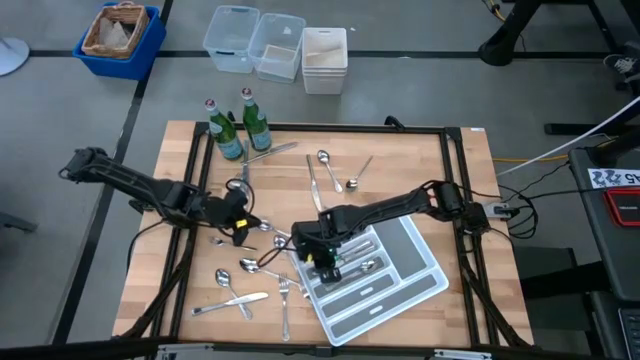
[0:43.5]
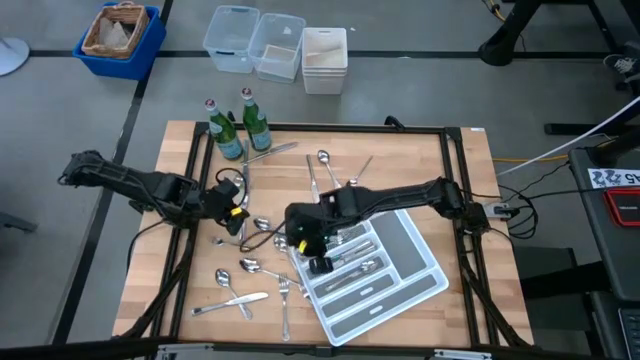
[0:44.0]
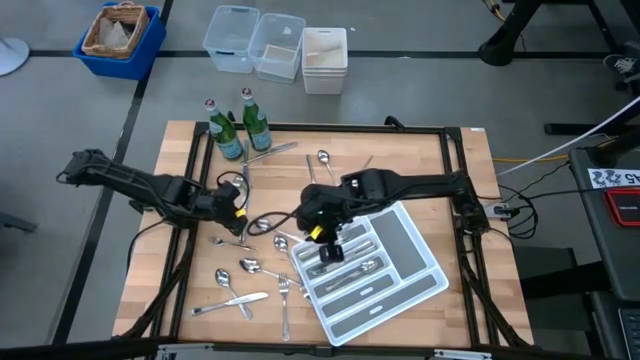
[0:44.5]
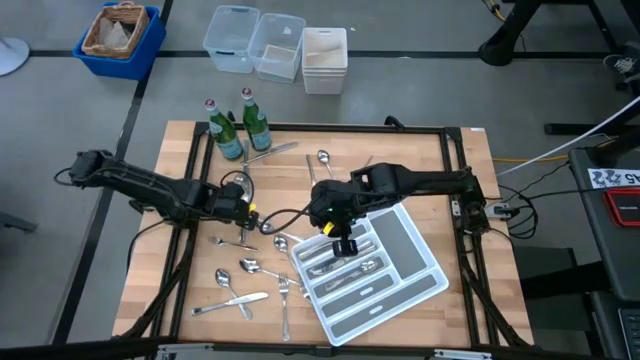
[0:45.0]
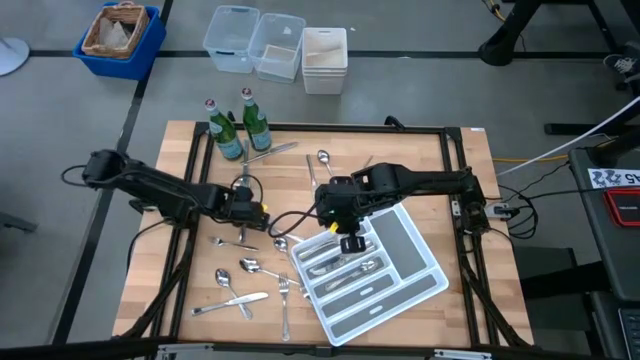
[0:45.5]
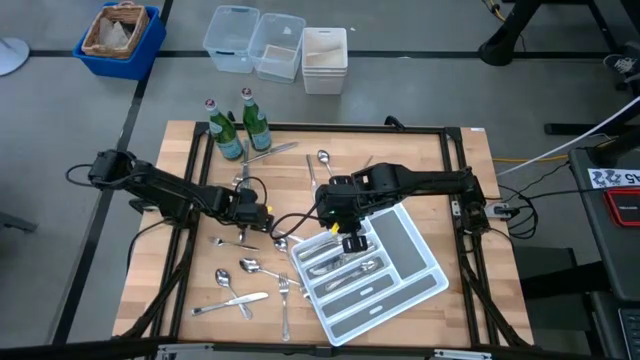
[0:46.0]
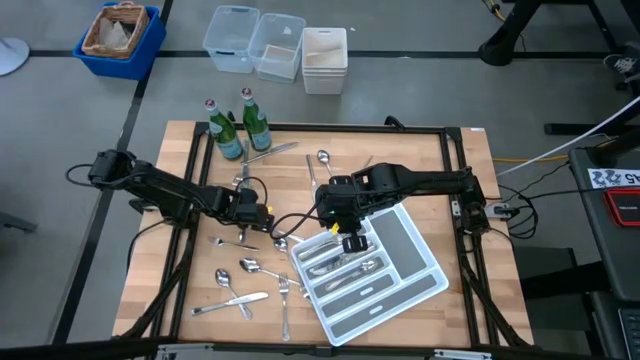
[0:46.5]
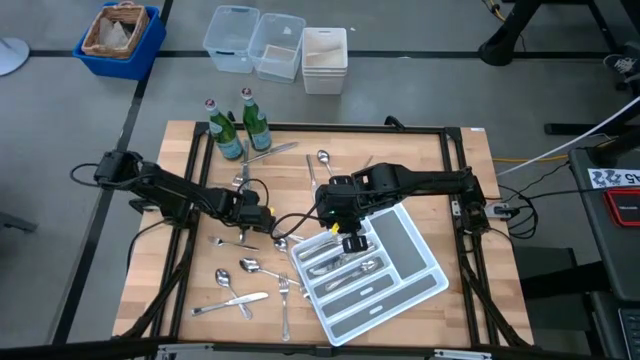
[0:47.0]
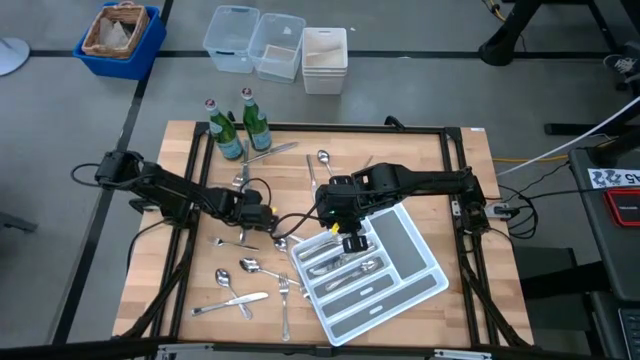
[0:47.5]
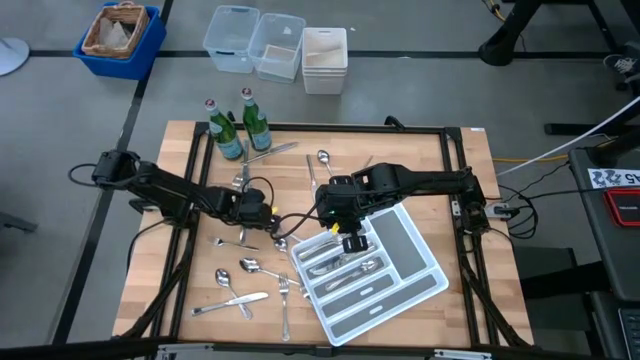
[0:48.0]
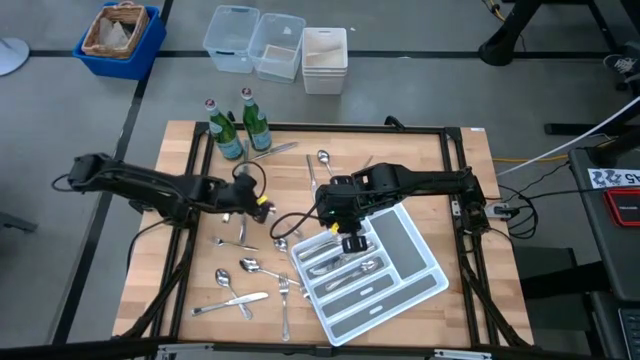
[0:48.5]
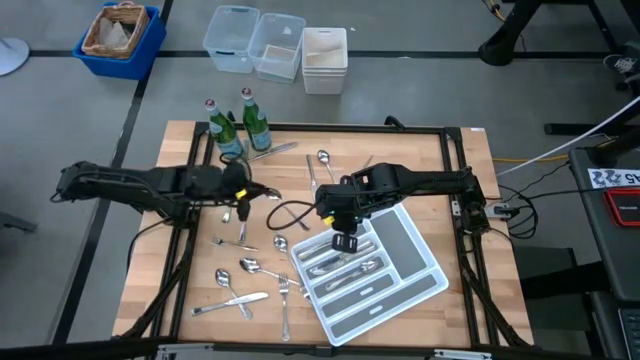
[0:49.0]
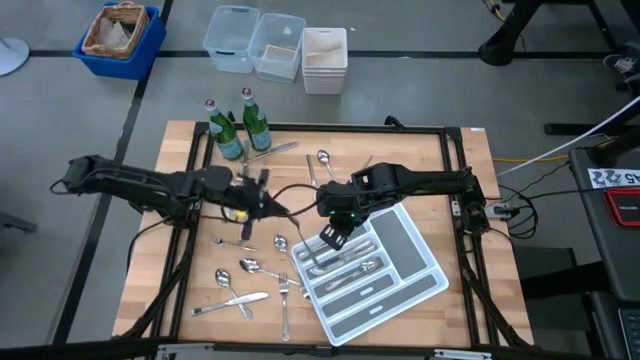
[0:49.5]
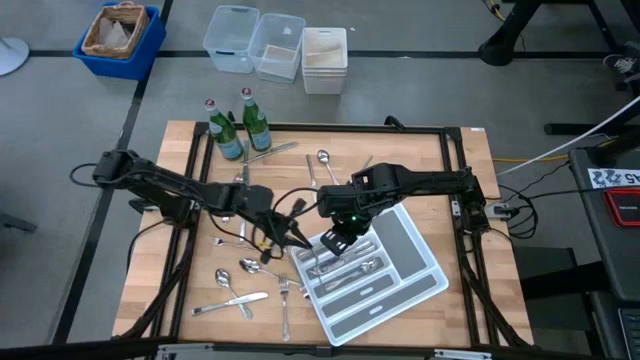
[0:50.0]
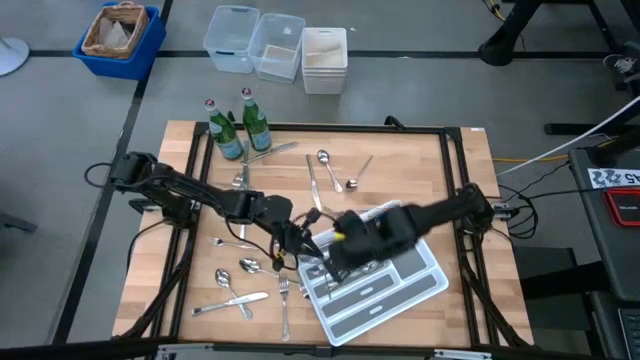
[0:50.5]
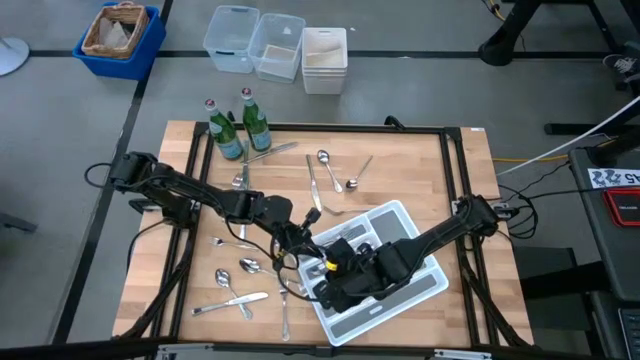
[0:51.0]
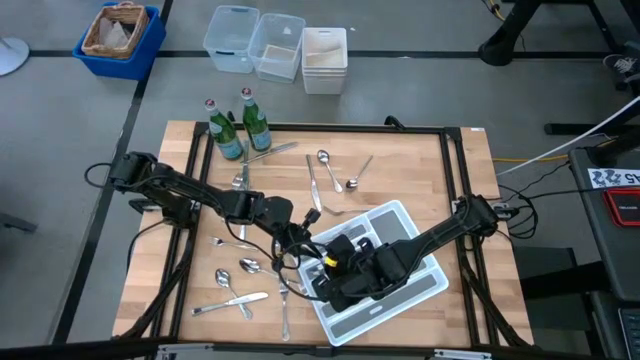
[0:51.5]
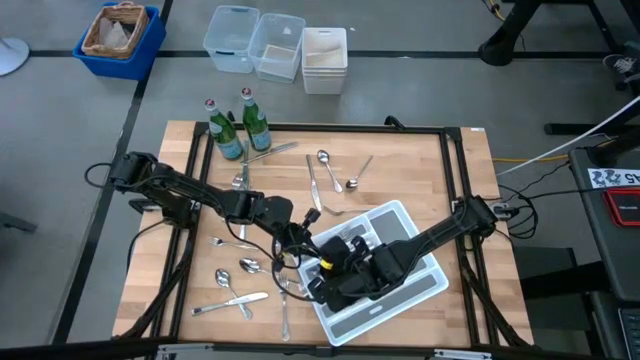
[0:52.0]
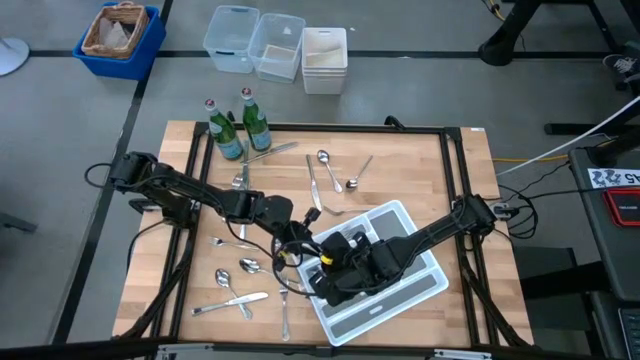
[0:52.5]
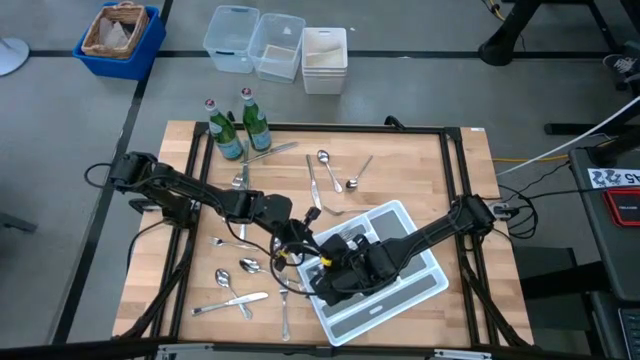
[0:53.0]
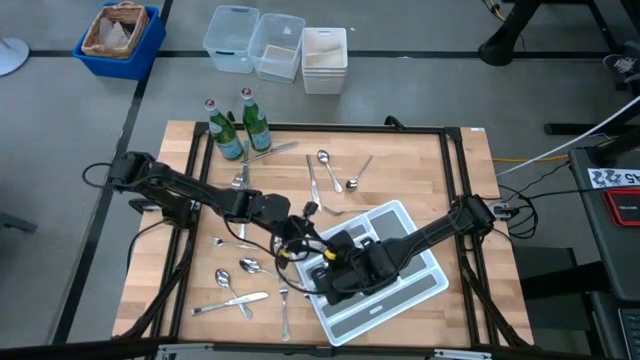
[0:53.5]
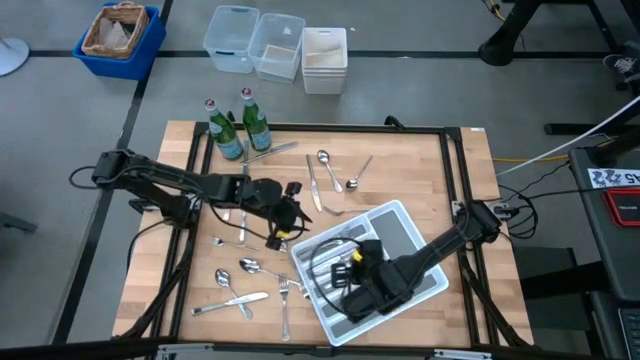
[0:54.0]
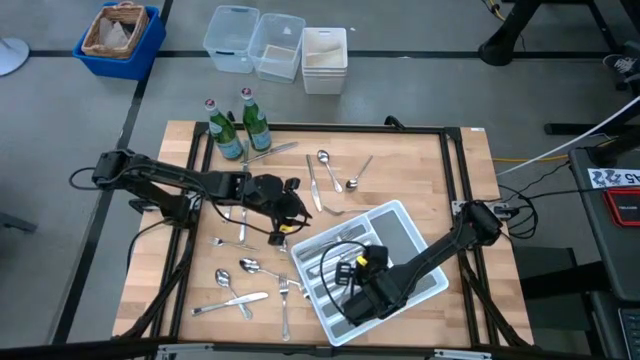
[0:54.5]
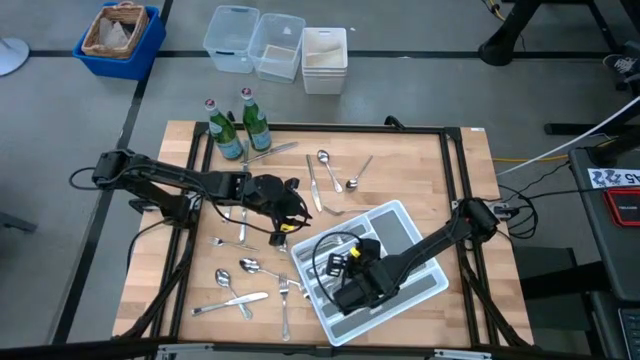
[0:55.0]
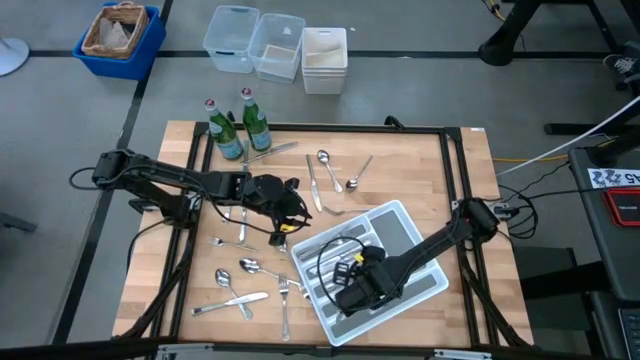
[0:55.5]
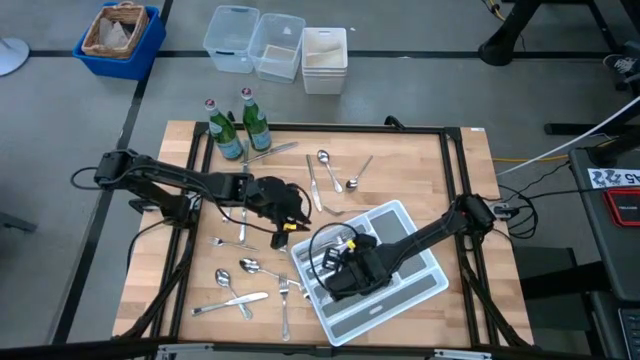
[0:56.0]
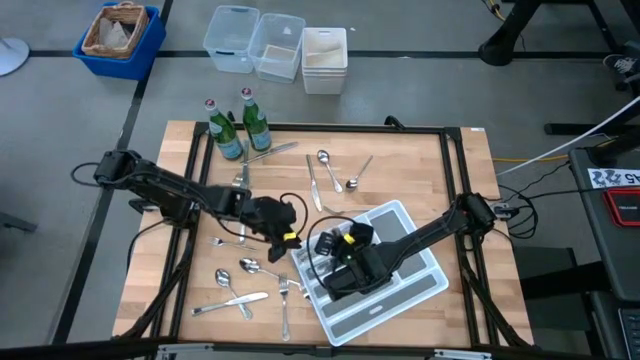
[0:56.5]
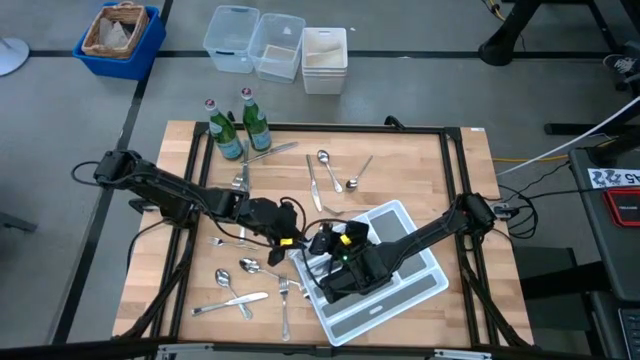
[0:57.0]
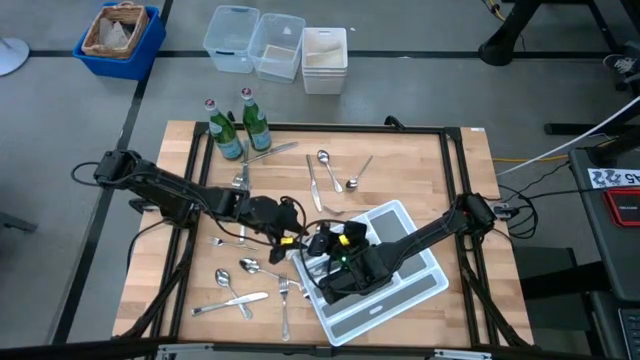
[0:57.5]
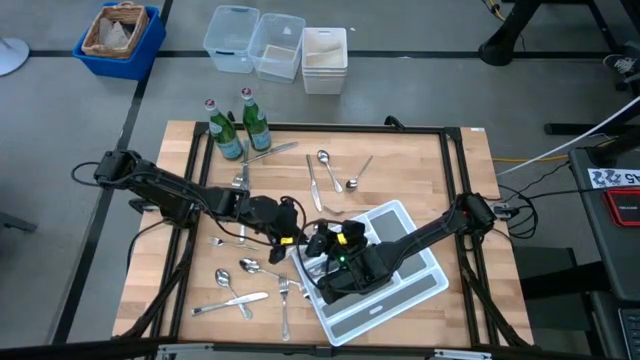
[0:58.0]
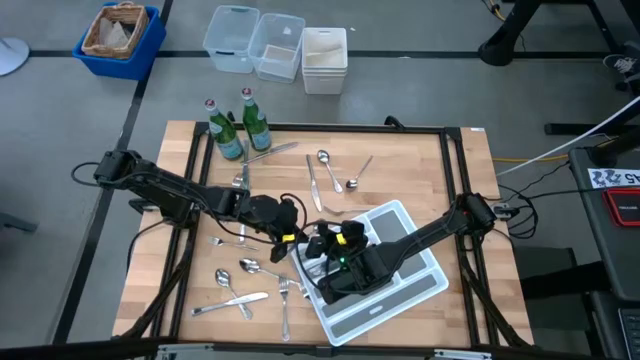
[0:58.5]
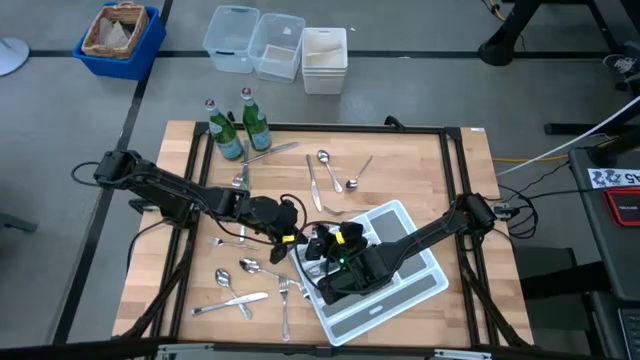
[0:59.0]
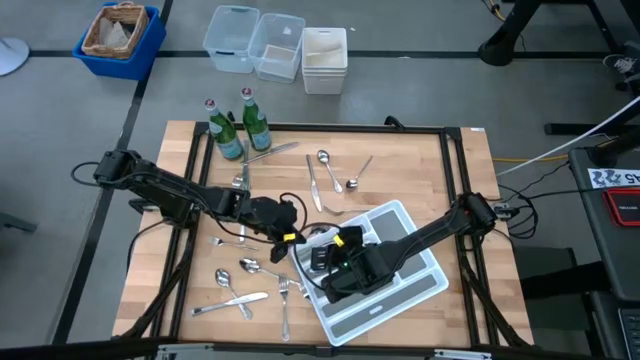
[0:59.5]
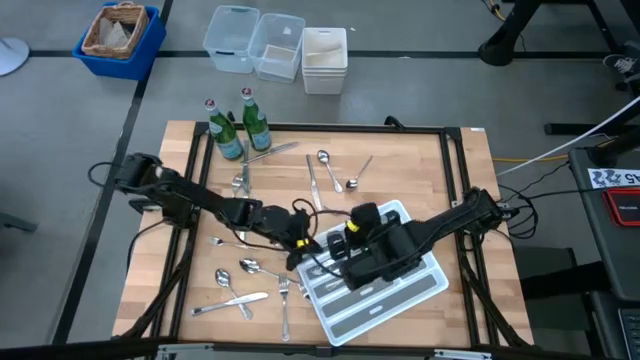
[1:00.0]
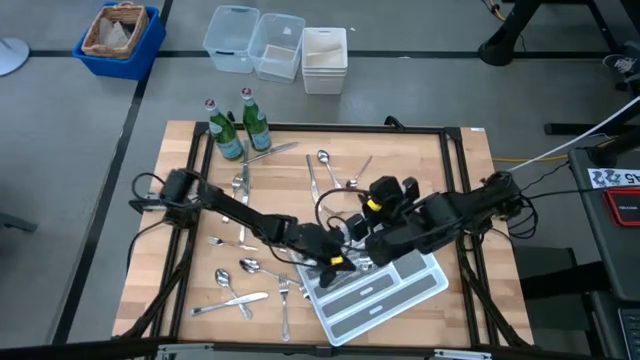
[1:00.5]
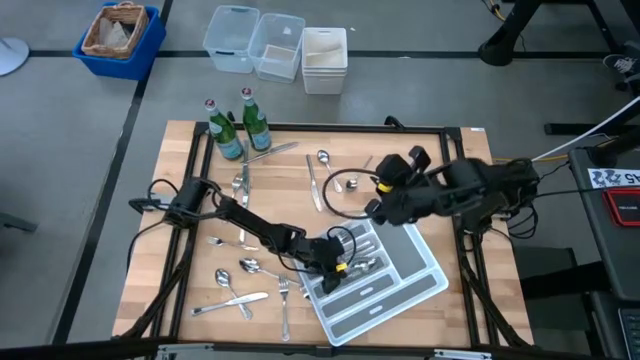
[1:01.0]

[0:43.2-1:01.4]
Task: Sort silverware
Put the silver spoon into the white silverware tray

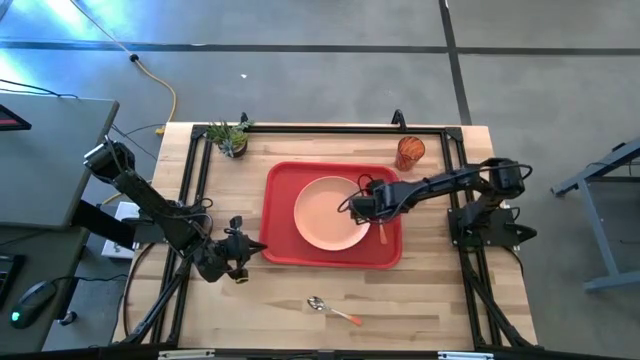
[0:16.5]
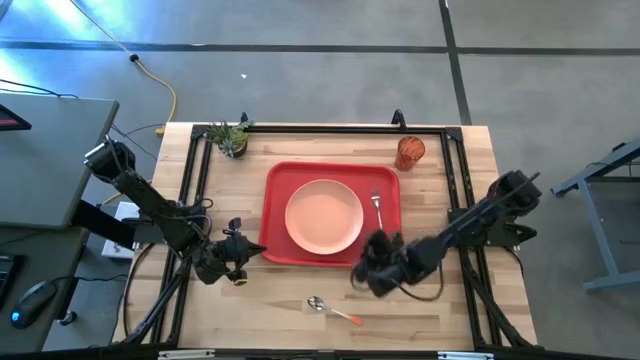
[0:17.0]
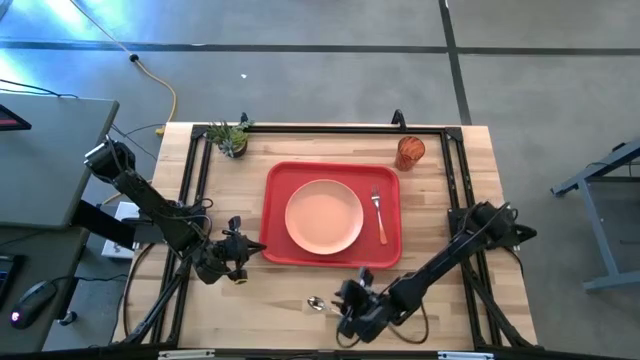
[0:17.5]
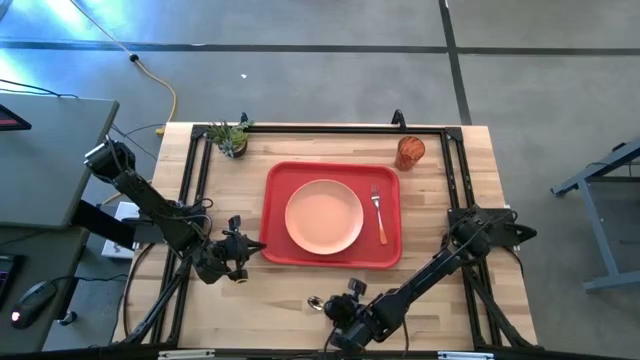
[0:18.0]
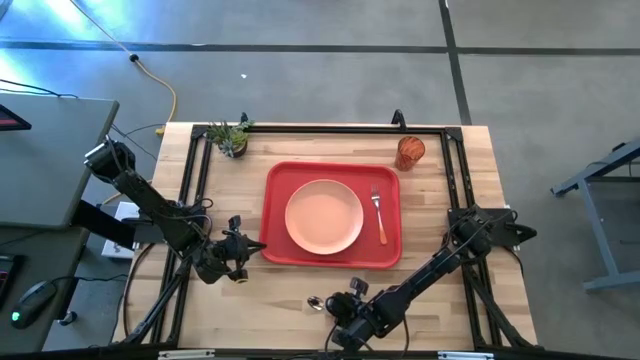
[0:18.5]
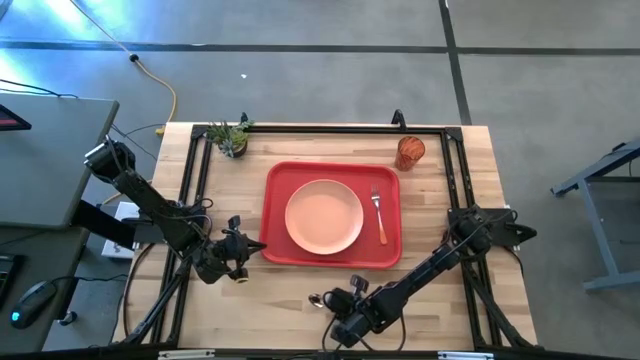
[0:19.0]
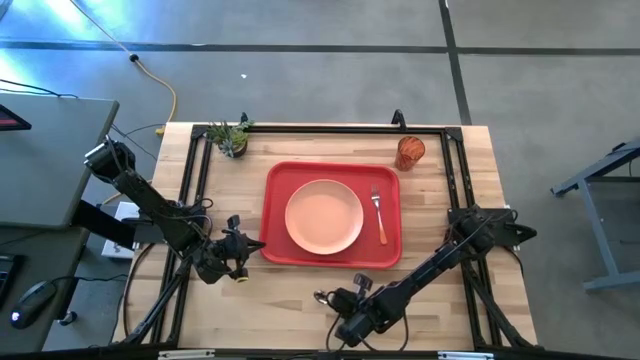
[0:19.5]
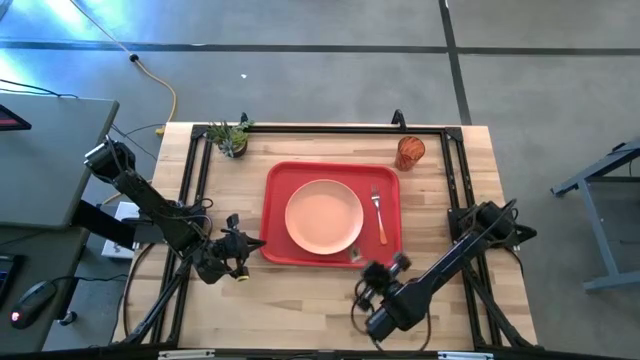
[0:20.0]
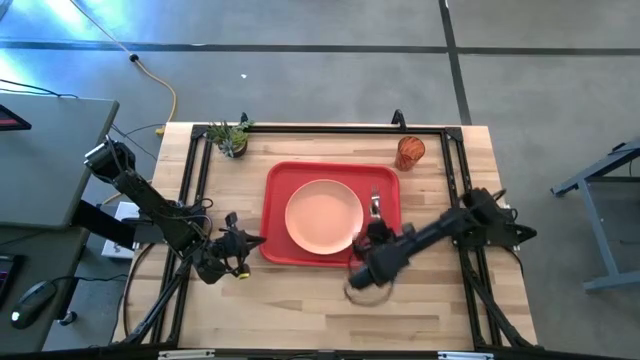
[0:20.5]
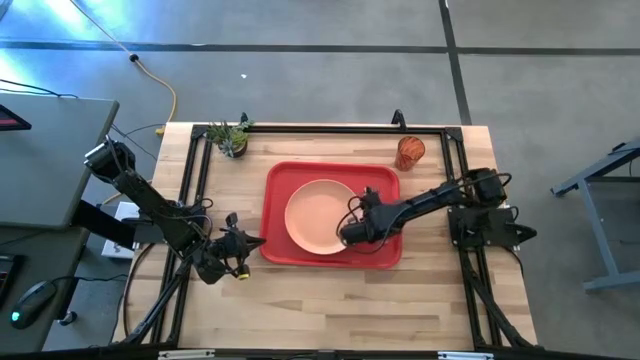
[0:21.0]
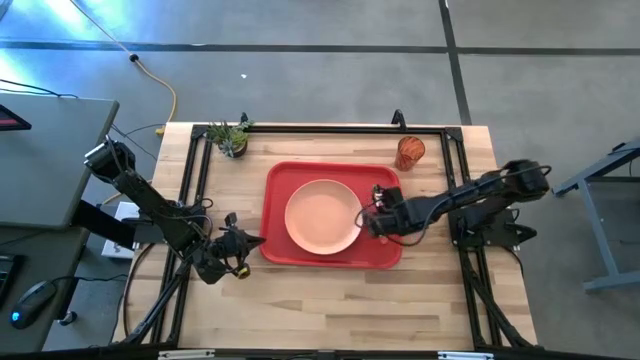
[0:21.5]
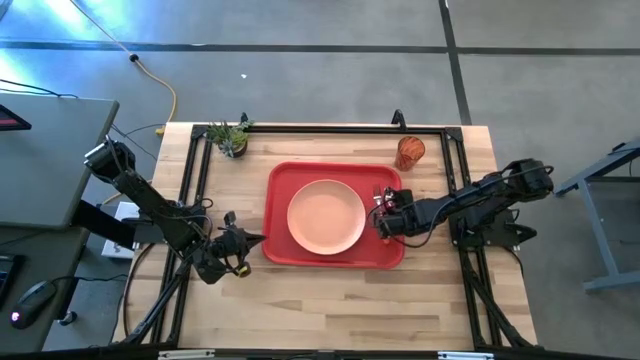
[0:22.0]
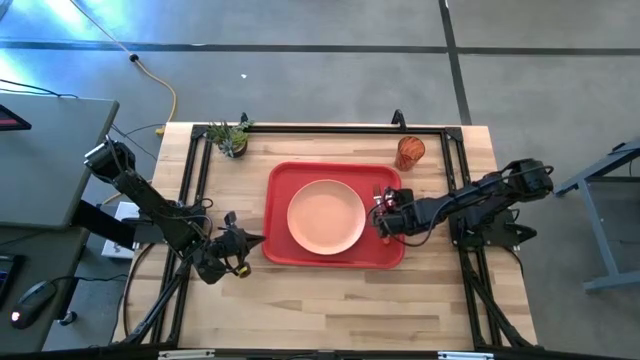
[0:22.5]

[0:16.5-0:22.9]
Task: Pick and place plate/cup/fork/spoon on tray
Put the orange spoon on the red tray
